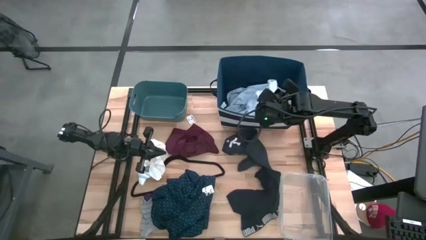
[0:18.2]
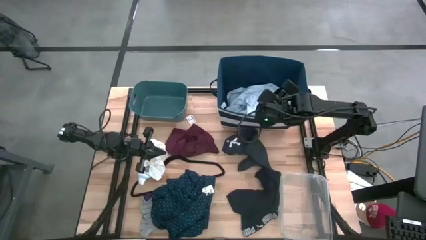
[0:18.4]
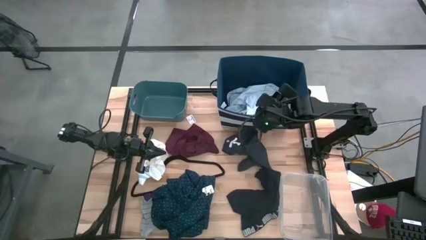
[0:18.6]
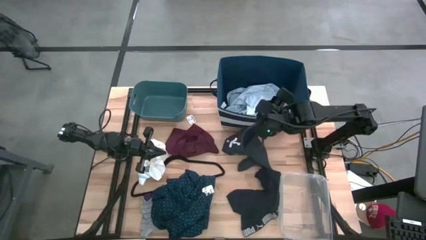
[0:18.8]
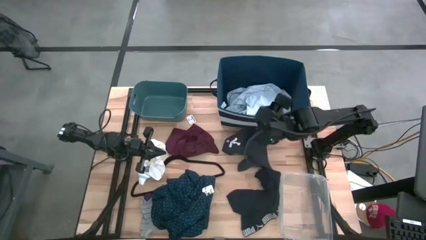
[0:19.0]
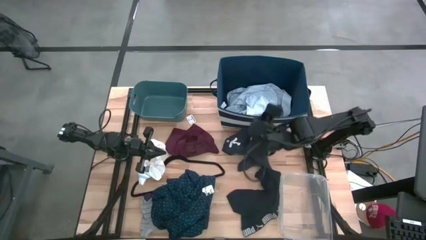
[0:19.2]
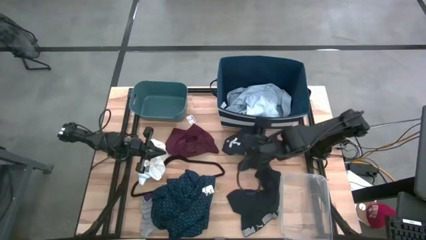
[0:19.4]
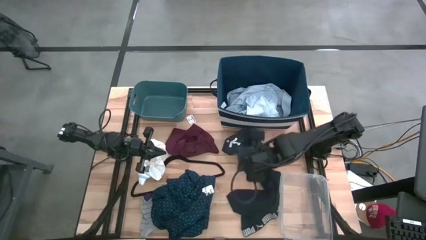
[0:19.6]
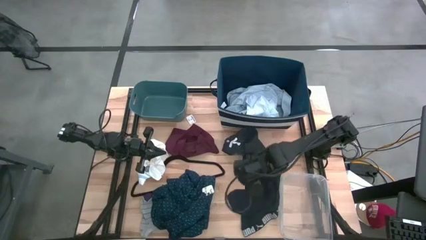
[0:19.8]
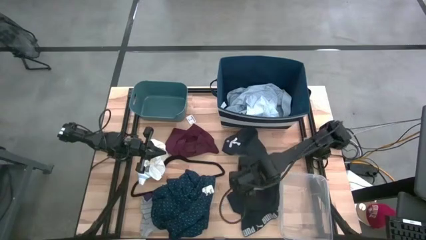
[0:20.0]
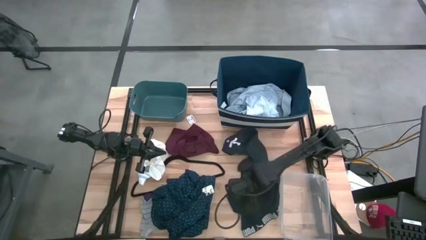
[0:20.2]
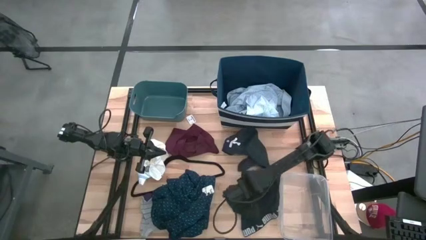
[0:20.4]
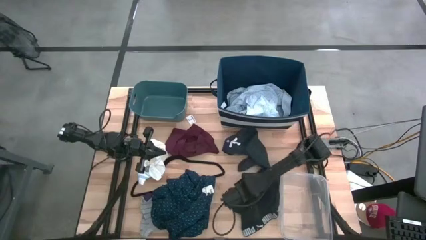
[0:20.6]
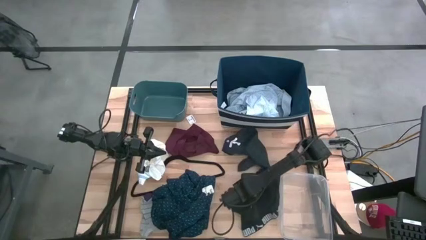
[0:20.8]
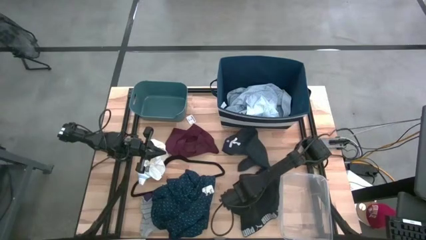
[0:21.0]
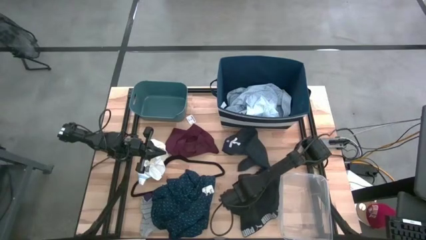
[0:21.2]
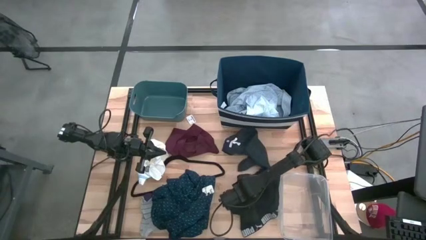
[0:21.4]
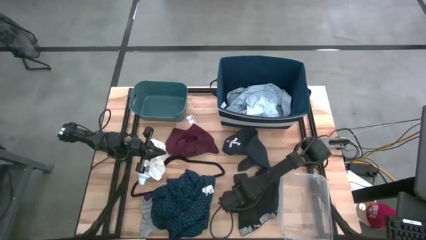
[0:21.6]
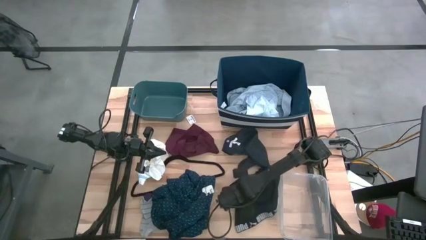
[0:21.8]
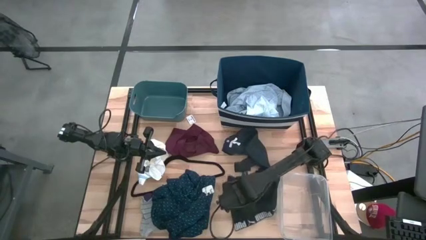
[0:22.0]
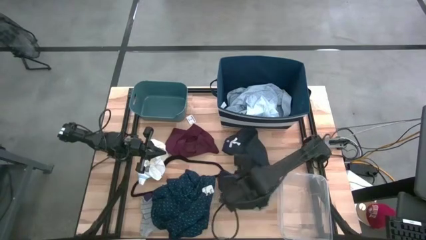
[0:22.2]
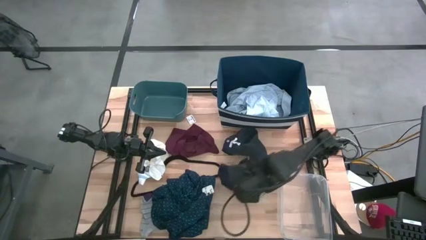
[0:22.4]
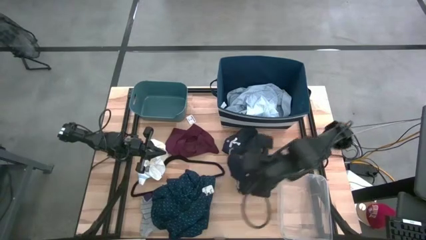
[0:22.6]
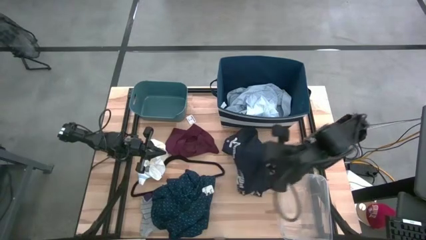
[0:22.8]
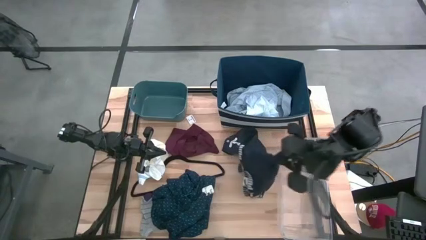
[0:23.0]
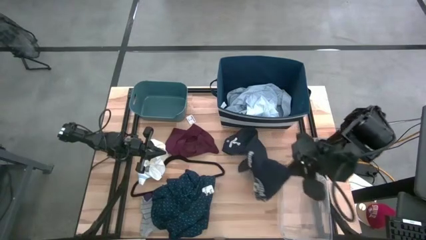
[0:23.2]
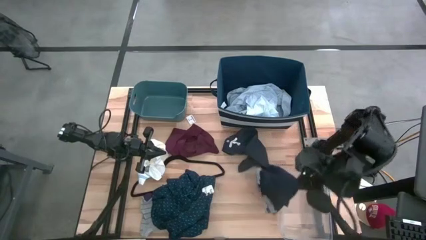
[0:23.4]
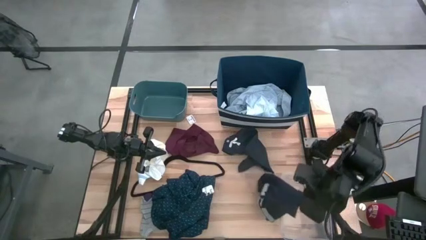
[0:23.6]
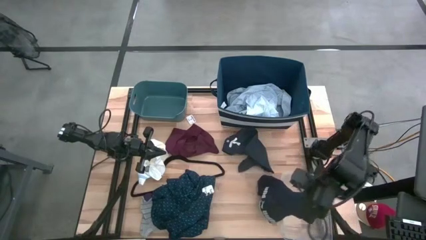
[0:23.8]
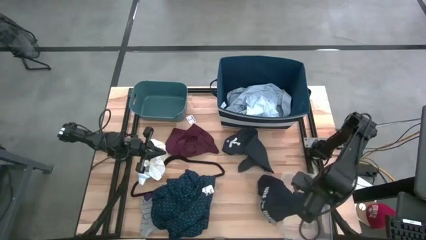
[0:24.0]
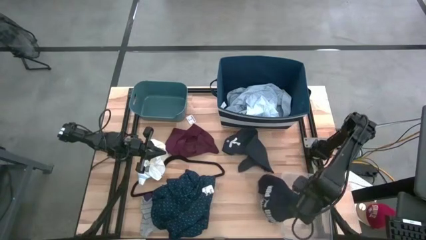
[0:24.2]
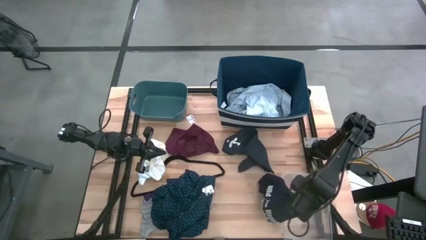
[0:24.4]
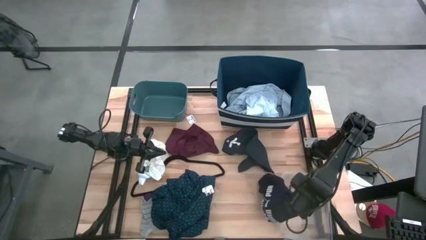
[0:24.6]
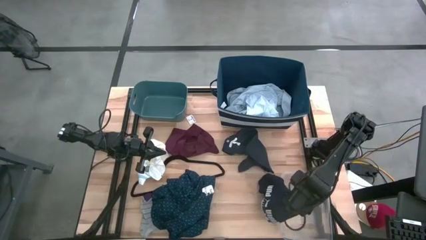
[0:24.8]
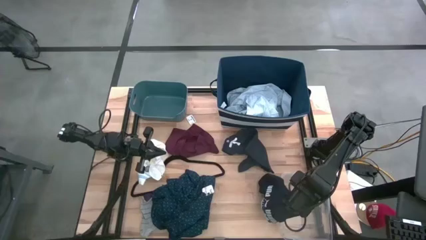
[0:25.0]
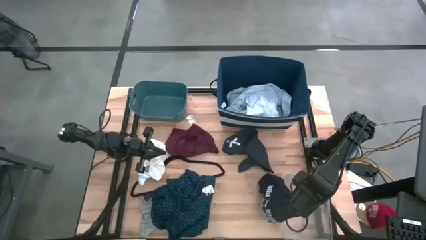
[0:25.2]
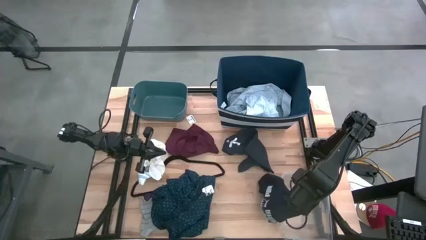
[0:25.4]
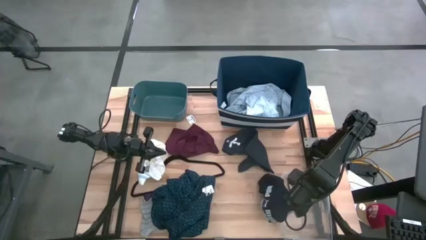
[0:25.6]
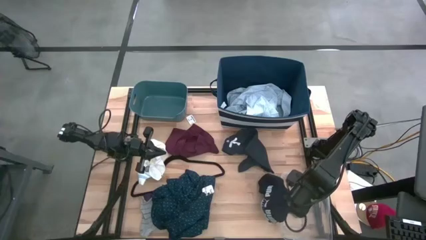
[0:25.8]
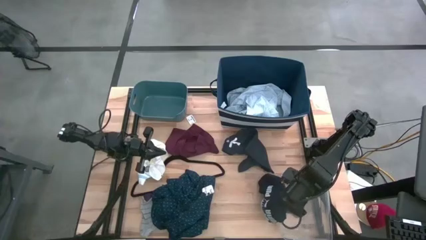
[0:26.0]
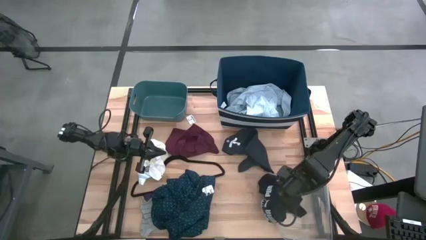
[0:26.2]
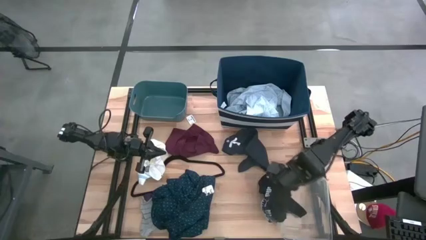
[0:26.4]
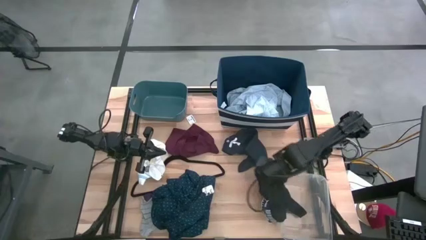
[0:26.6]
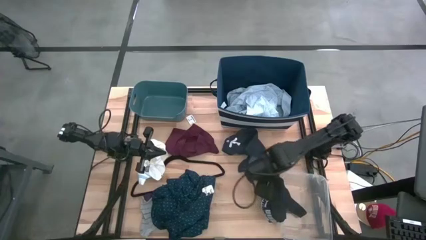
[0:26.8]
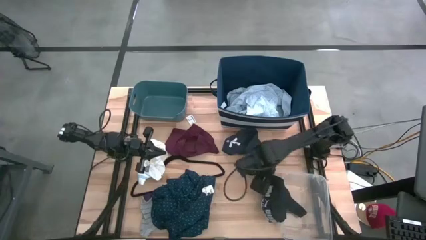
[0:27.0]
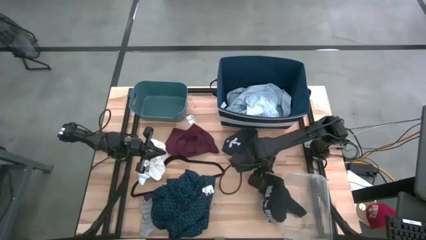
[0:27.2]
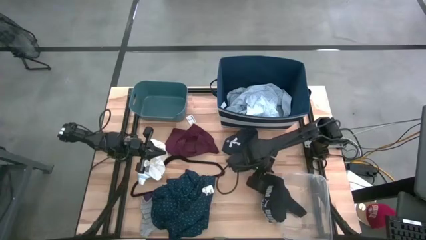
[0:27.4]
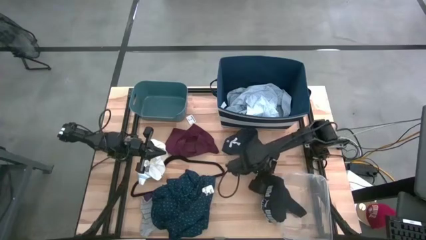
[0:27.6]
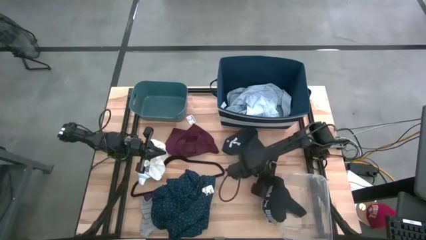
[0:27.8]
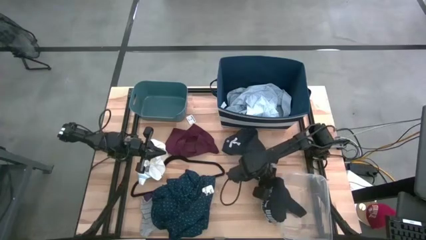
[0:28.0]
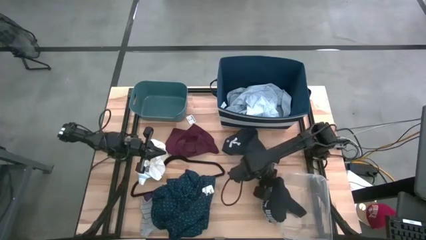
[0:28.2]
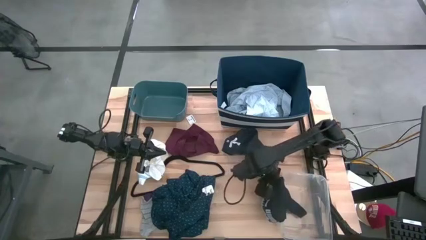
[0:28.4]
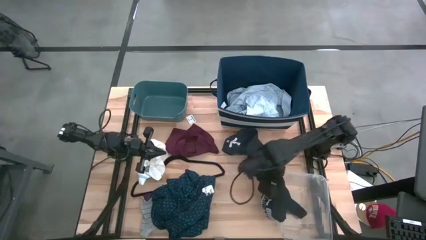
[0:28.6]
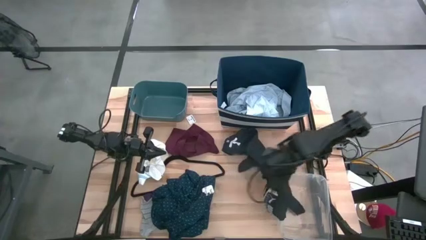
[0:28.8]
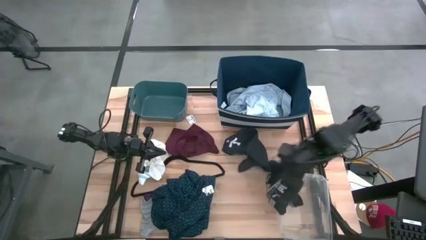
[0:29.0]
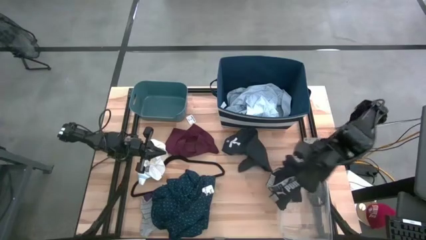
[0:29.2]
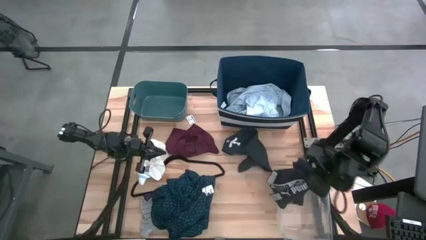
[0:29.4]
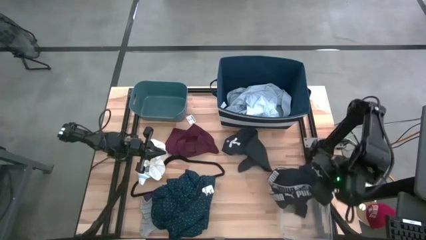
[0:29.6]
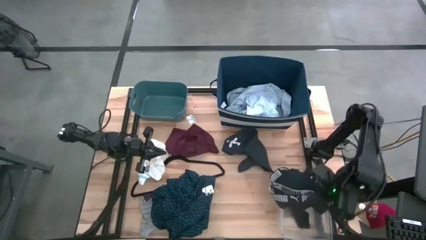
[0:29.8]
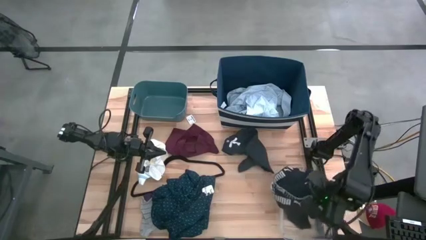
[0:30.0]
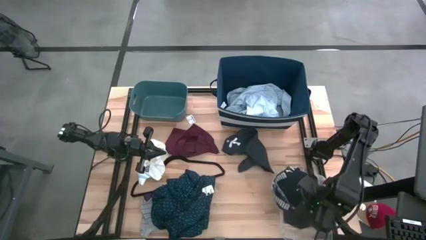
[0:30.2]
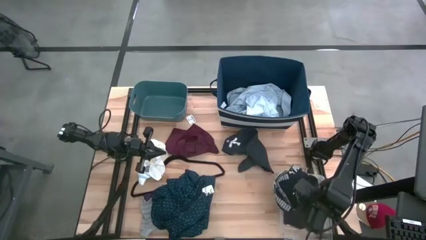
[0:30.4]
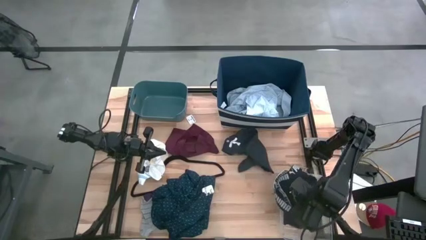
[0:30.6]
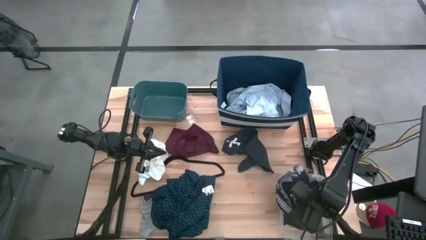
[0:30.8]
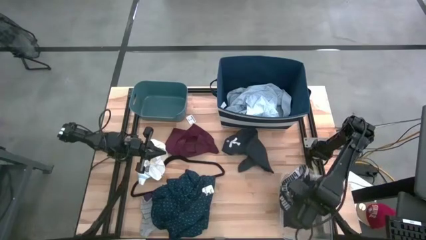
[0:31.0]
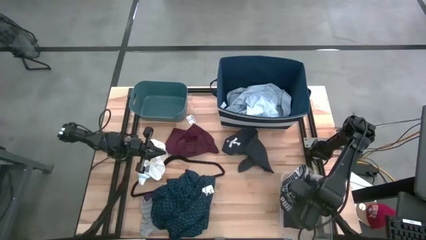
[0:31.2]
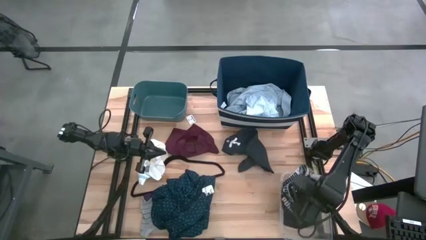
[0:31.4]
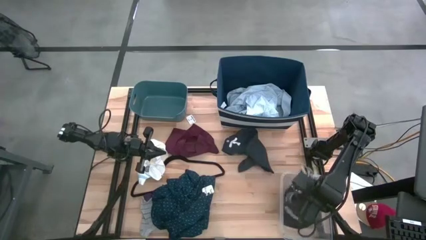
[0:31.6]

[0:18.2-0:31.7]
Task: Pick & Place Cloths
Put the black boxer shorts into the transparent bin
